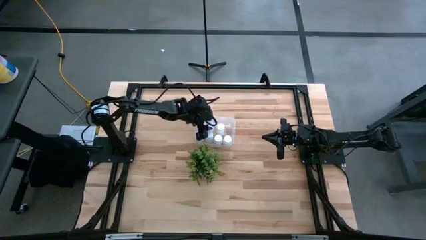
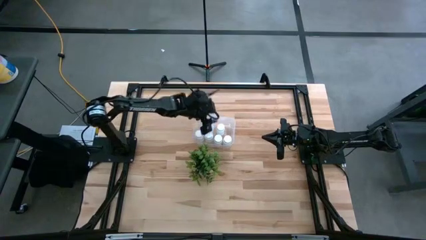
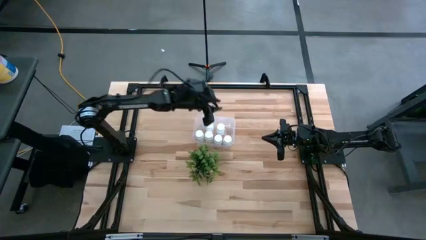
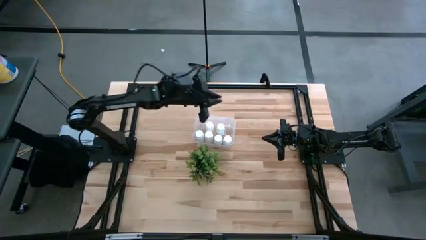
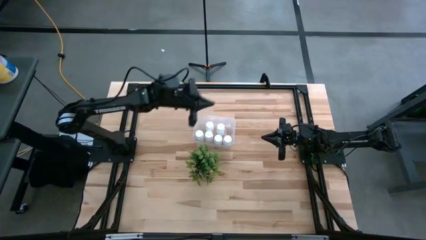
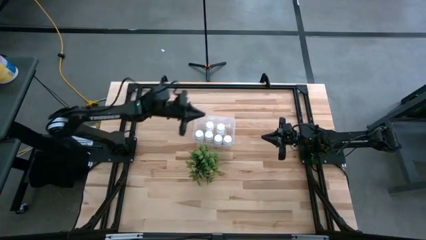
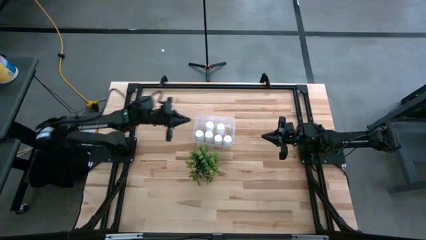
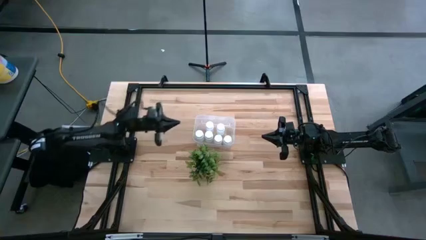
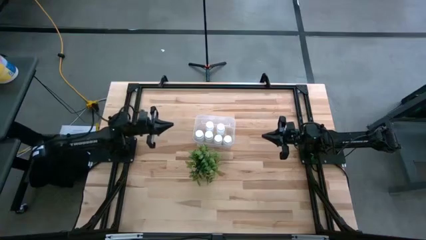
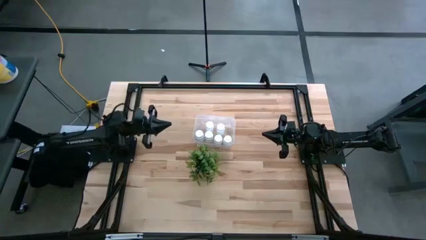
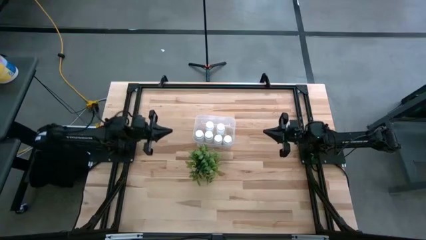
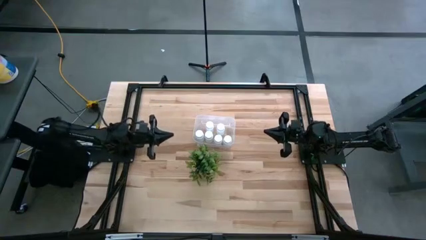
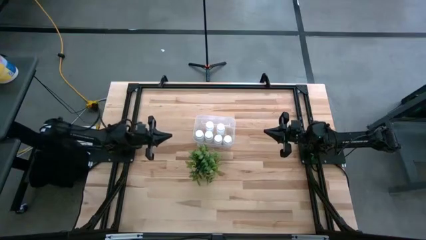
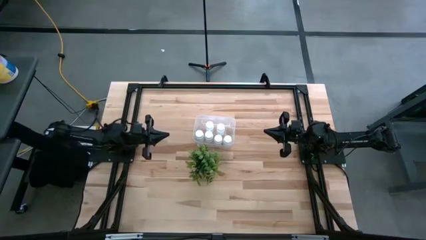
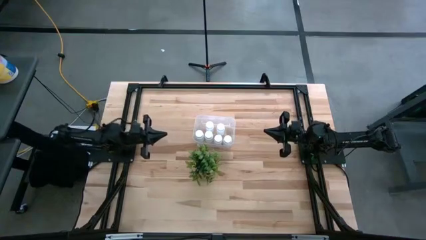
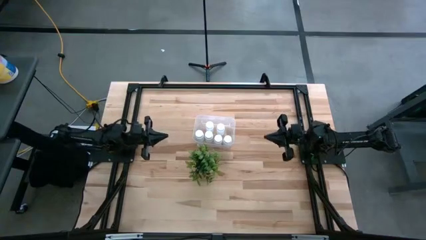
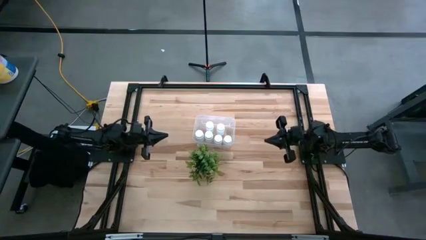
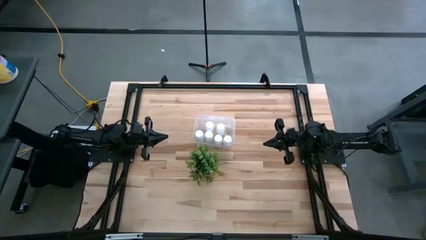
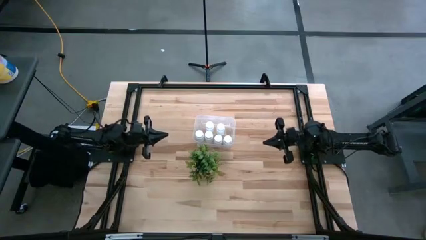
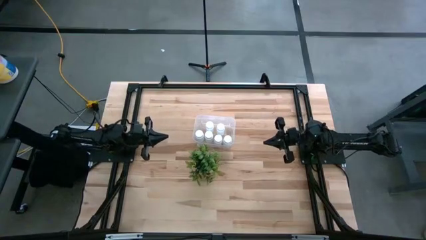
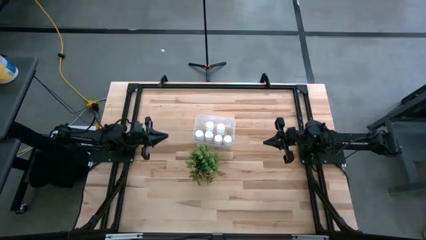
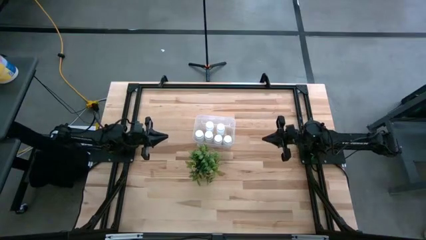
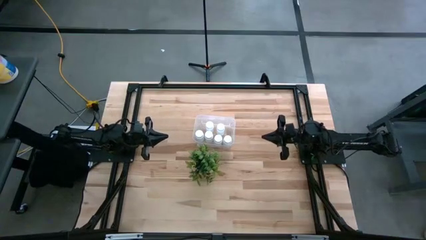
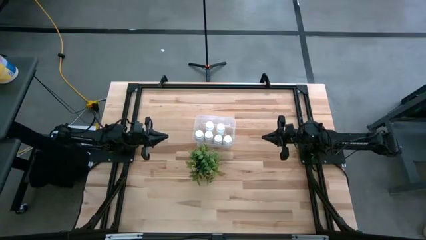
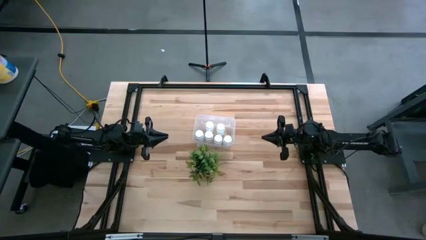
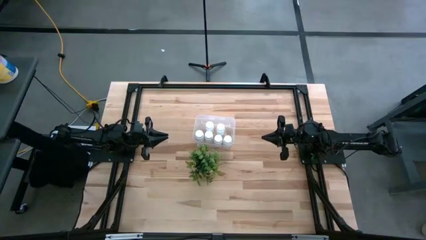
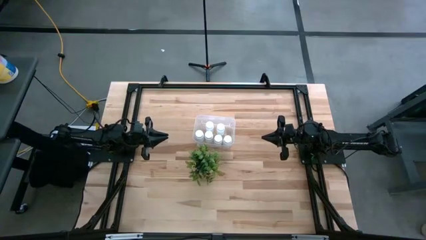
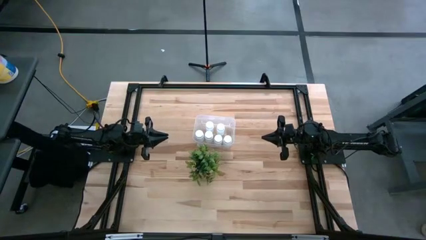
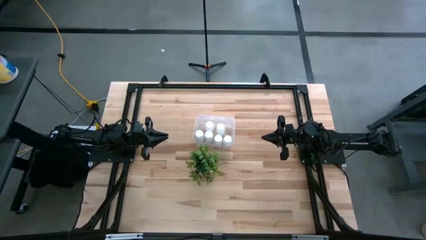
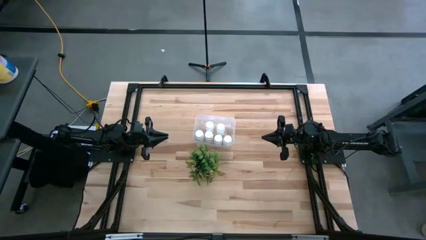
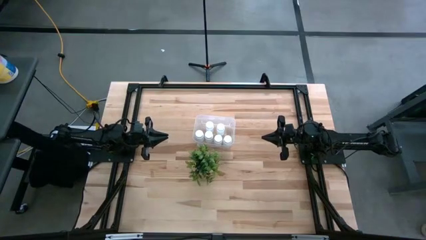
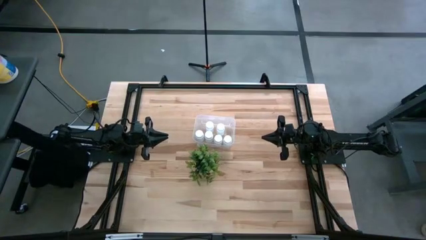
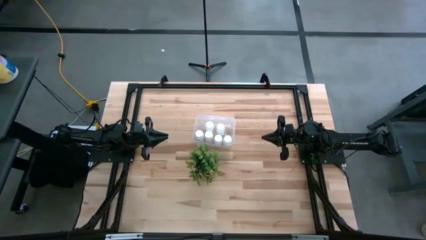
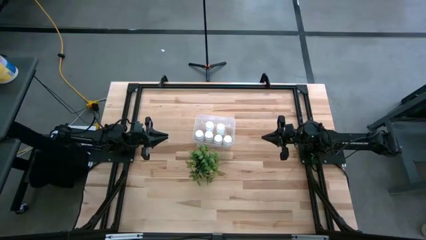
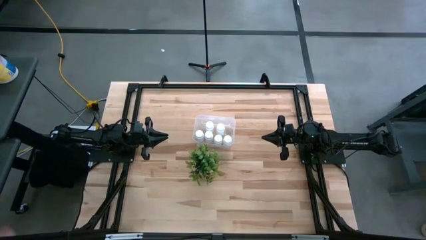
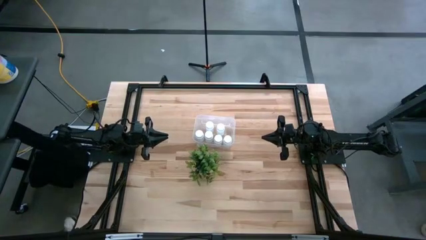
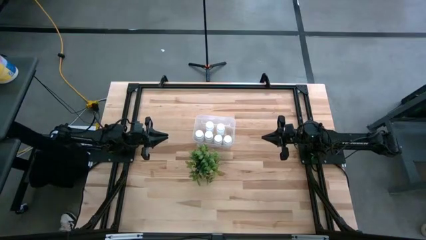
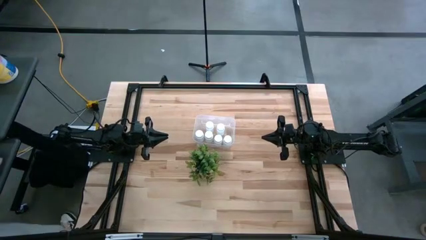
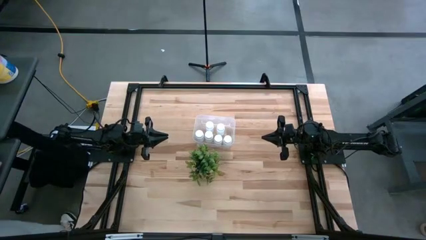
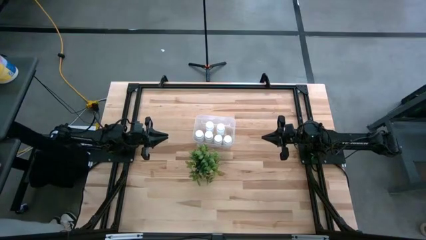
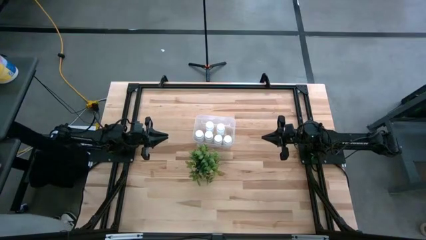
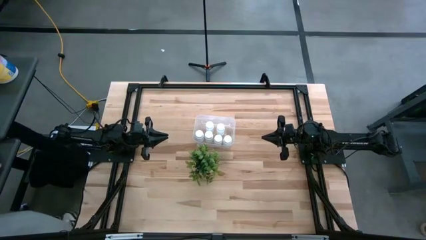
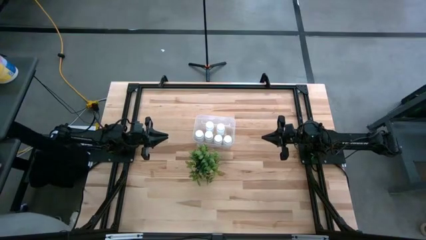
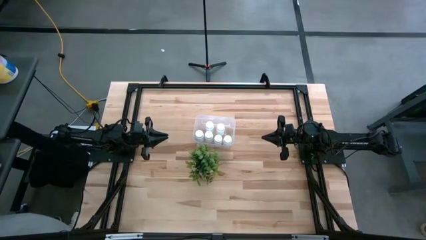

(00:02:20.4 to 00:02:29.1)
Task: Pick and place pill bottles into a basket
Return to Home Position
